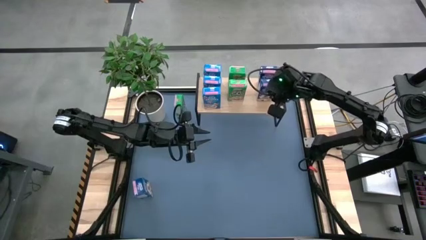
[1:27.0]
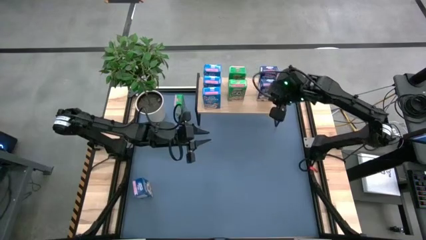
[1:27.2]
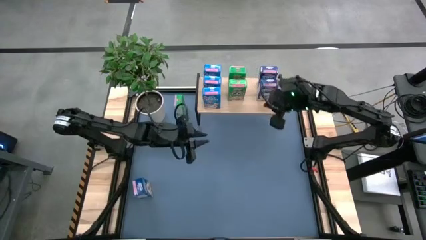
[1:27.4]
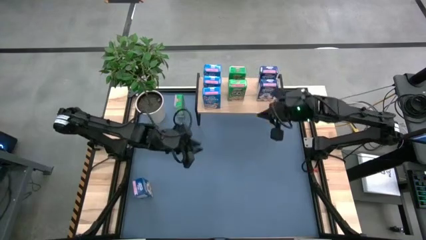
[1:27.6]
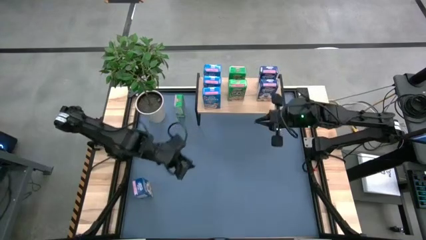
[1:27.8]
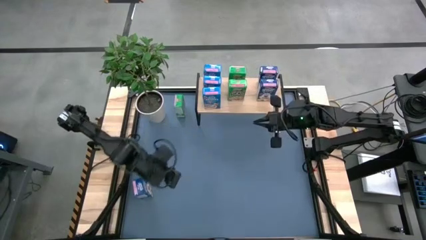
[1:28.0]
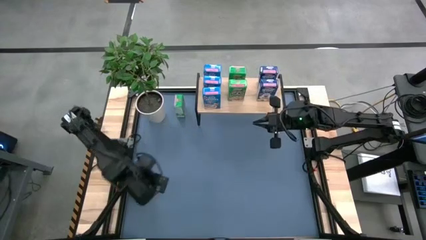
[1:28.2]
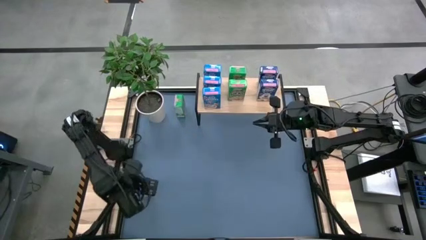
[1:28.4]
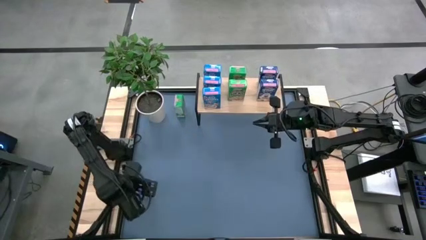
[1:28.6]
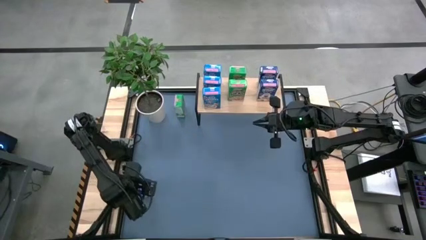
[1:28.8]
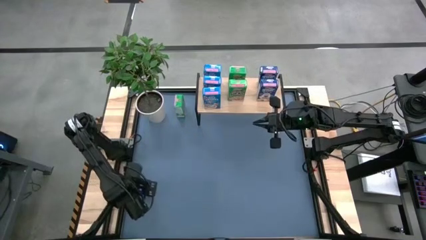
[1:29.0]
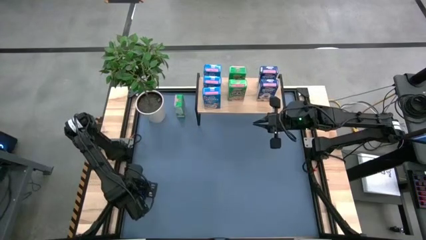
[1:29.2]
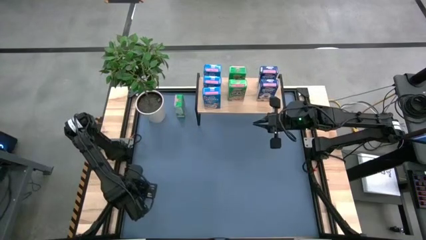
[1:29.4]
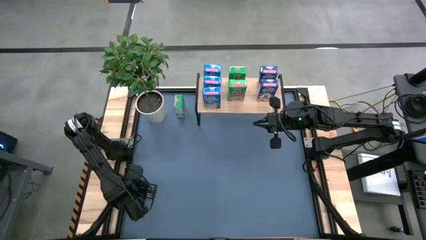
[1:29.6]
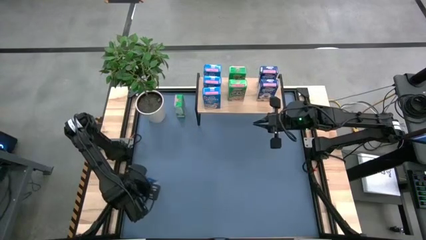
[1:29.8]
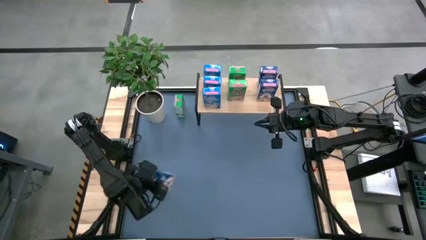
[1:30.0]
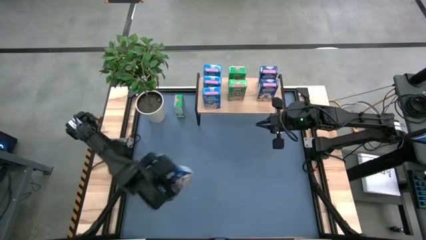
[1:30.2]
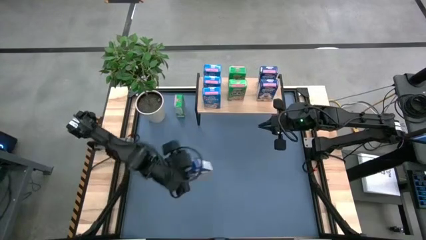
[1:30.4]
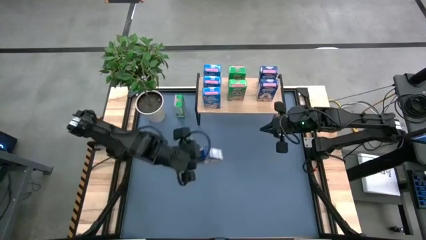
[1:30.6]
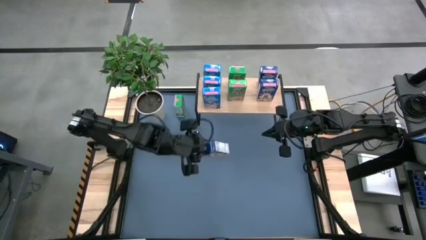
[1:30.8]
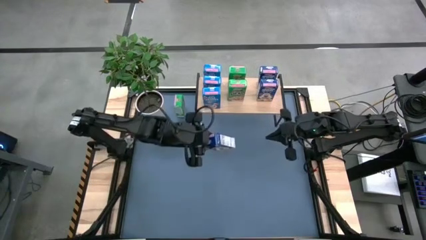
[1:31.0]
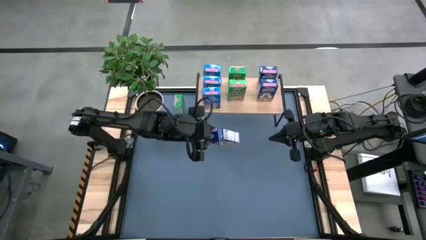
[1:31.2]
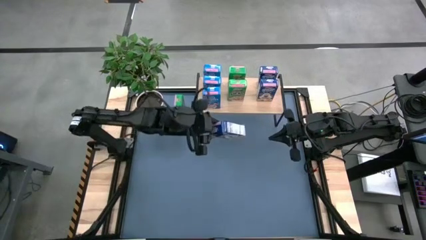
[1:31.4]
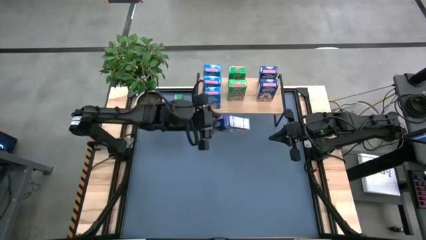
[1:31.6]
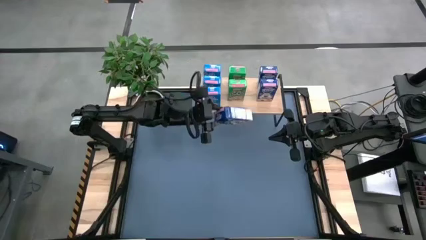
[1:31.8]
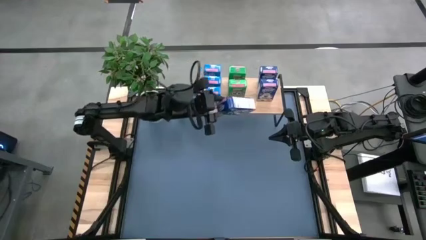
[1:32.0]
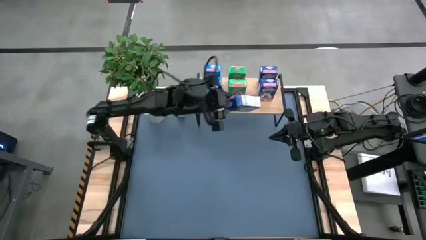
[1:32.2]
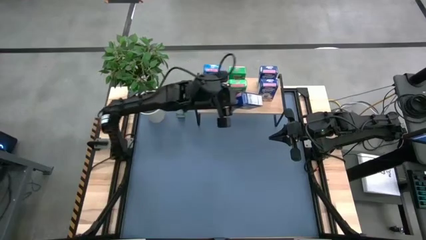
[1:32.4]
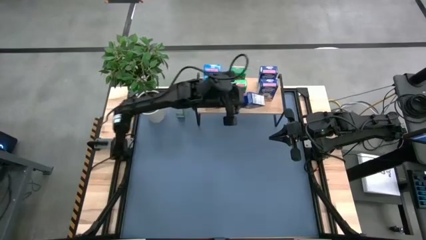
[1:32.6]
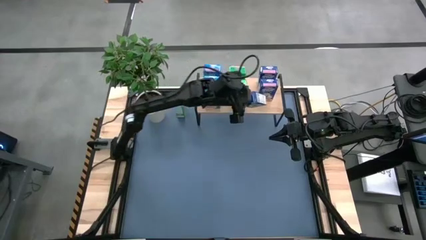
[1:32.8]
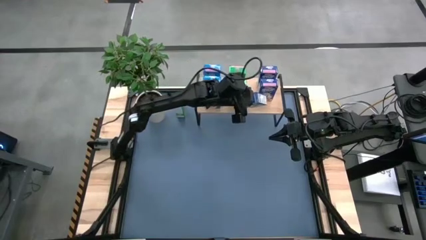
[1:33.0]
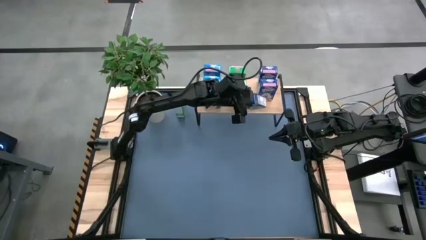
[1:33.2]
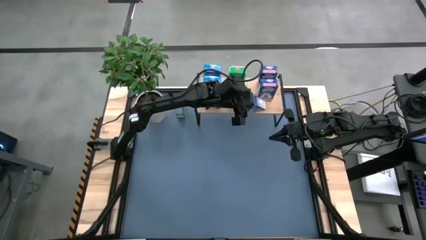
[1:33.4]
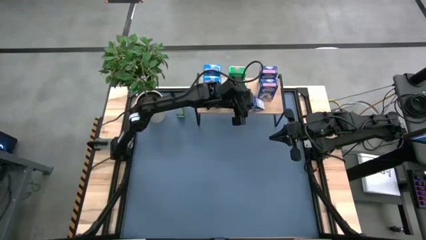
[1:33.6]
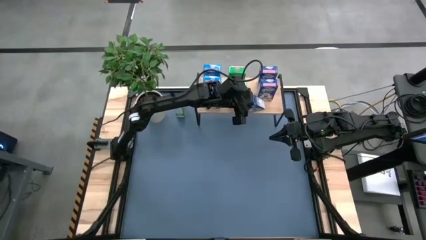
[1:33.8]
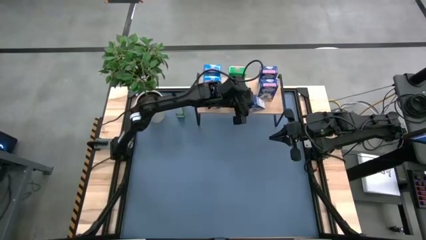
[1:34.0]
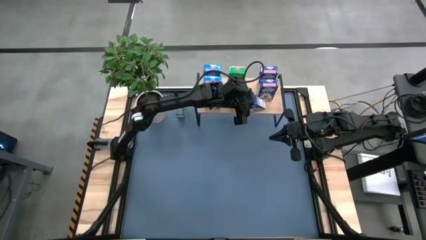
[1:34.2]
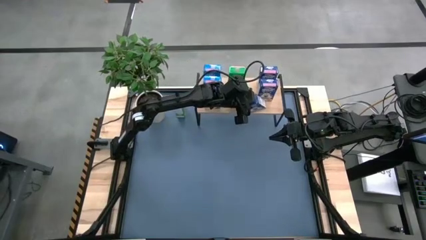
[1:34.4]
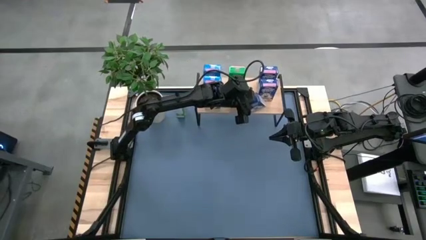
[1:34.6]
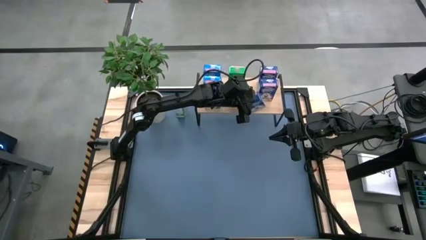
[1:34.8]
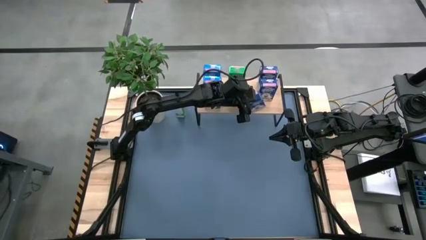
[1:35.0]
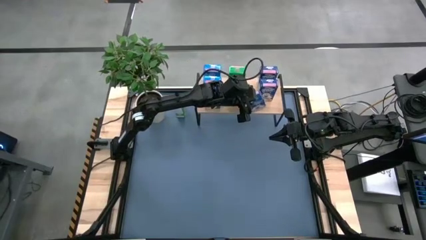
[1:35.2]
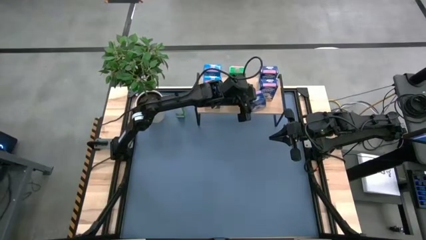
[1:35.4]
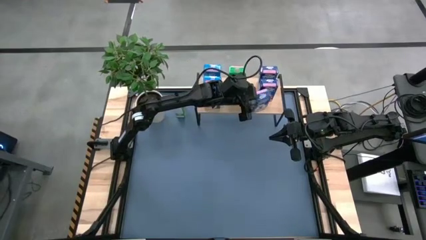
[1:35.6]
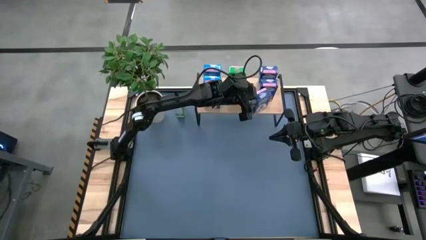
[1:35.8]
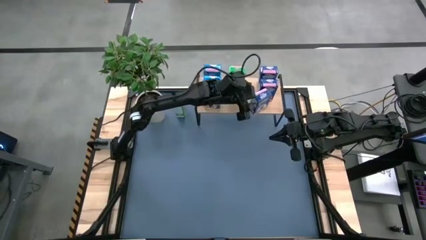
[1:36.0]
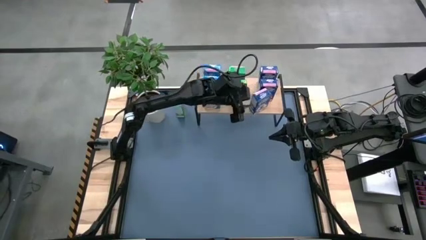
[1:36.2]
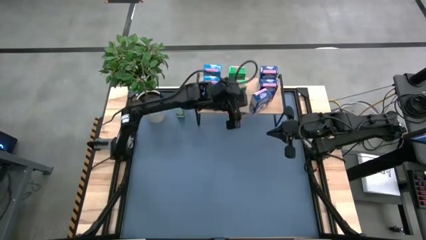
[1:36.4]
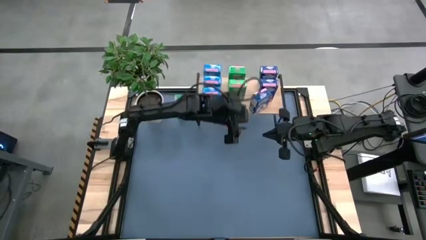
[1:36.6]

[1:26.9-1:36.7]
Task: Stack cereal on shelf
Put the blue cereal box on the shelf aligned with the other blue cereal boxes

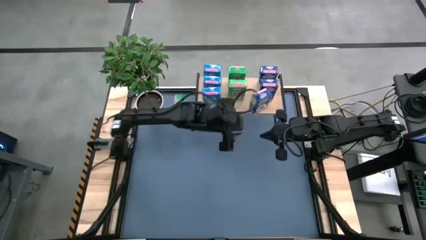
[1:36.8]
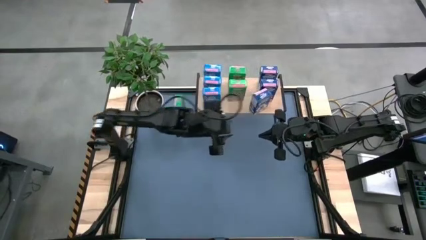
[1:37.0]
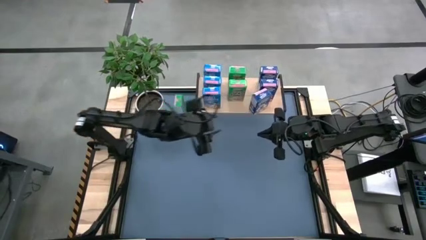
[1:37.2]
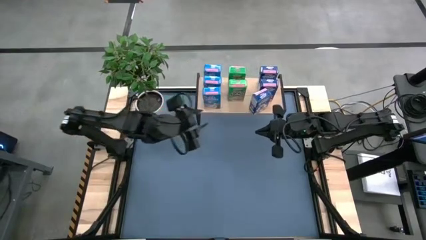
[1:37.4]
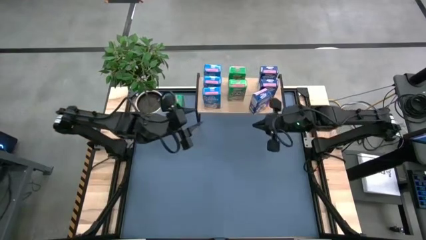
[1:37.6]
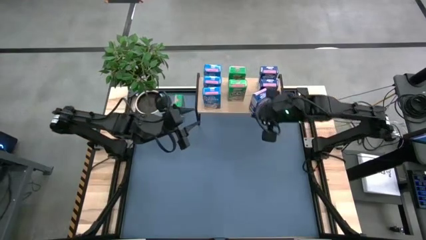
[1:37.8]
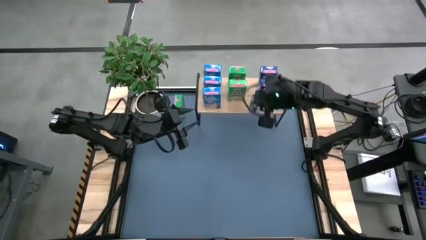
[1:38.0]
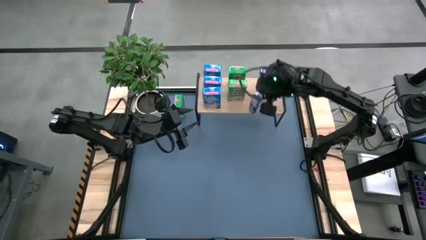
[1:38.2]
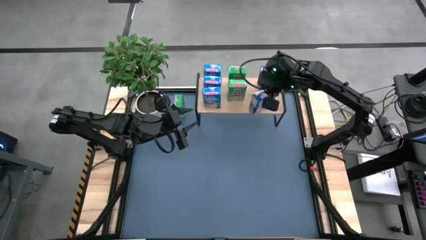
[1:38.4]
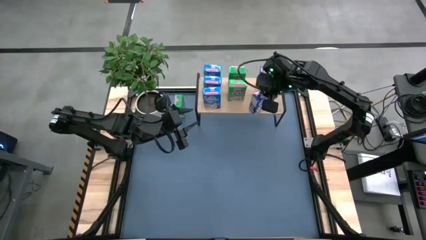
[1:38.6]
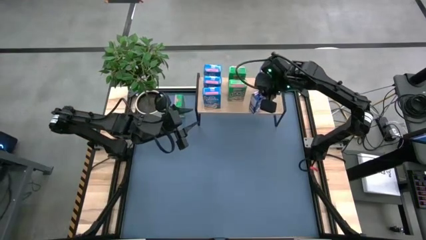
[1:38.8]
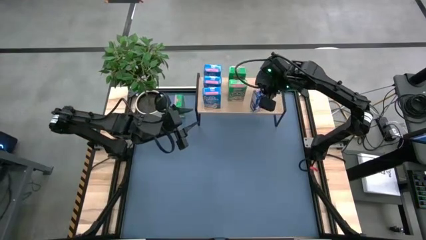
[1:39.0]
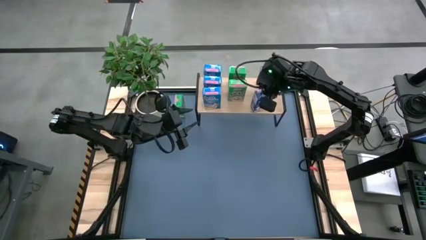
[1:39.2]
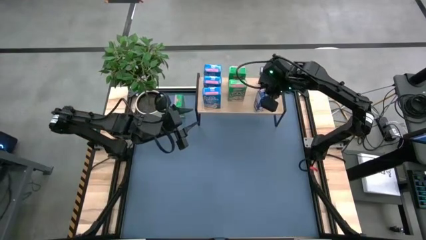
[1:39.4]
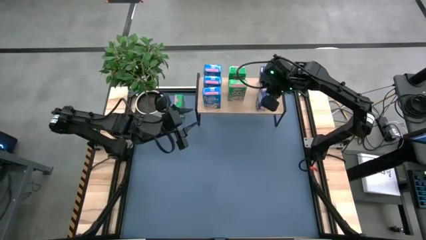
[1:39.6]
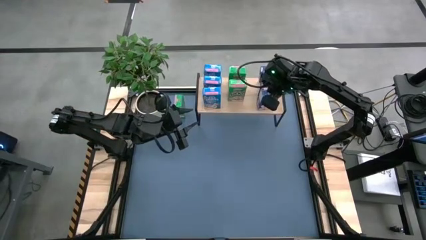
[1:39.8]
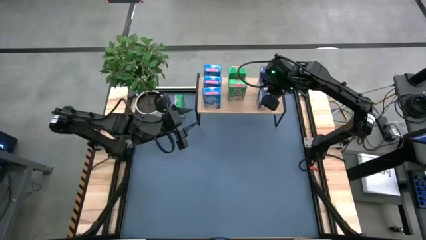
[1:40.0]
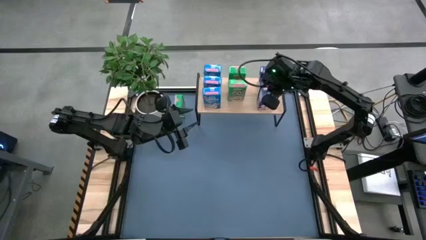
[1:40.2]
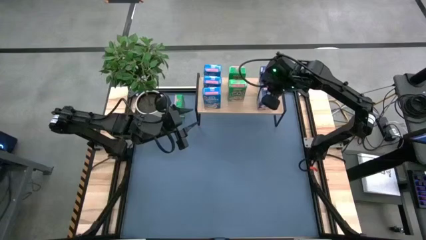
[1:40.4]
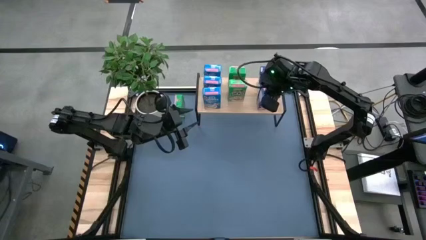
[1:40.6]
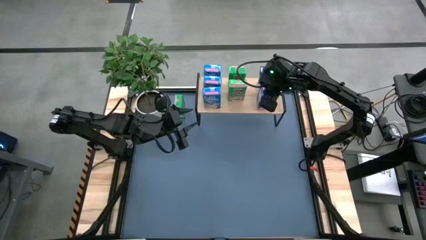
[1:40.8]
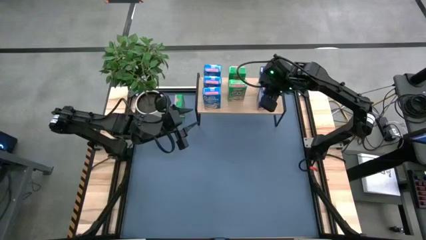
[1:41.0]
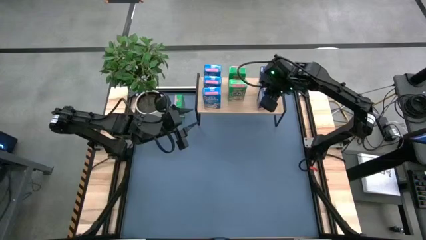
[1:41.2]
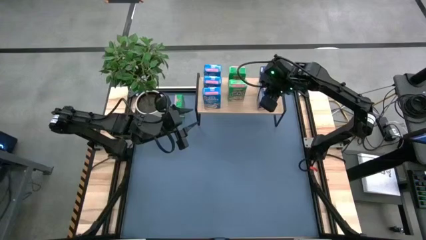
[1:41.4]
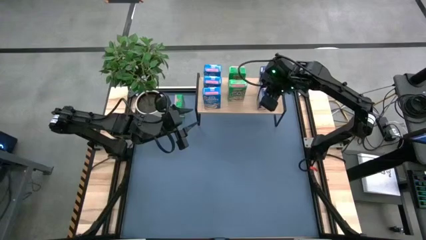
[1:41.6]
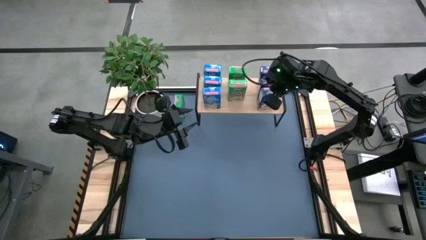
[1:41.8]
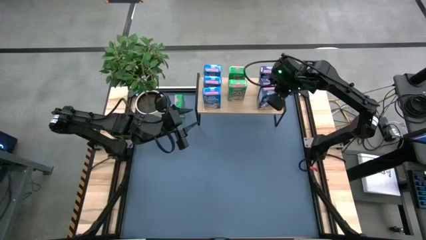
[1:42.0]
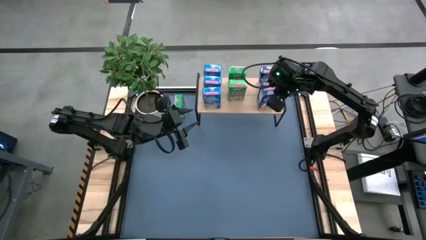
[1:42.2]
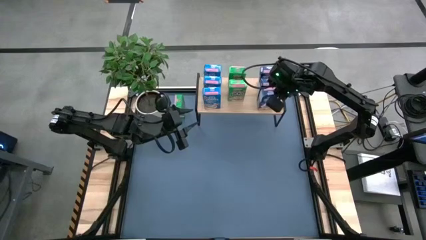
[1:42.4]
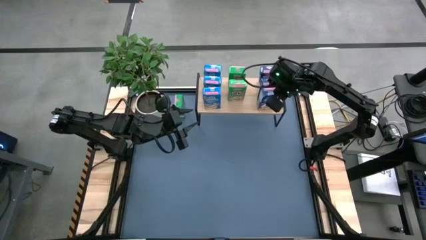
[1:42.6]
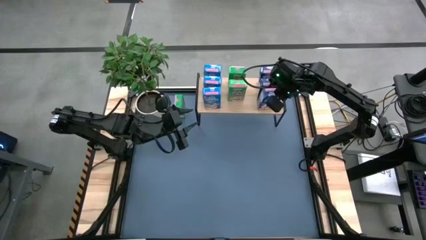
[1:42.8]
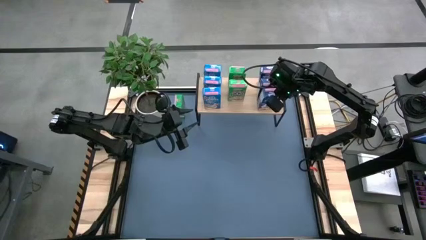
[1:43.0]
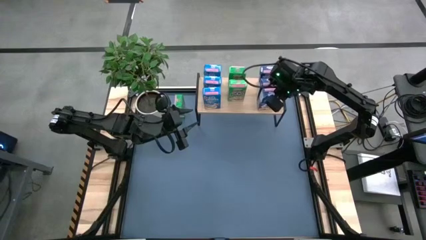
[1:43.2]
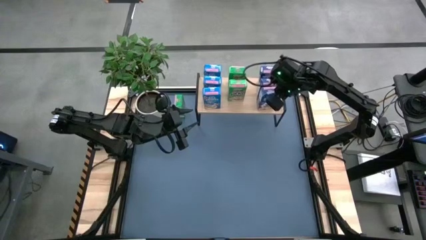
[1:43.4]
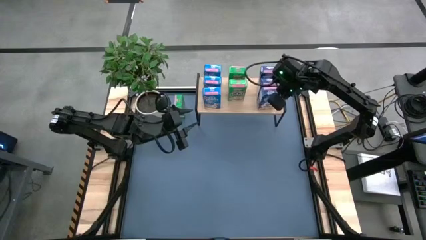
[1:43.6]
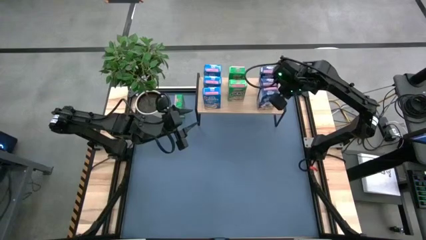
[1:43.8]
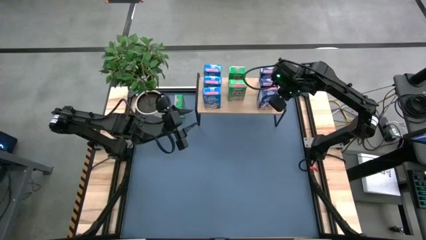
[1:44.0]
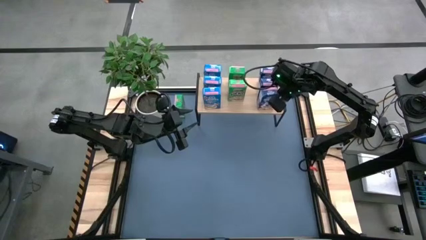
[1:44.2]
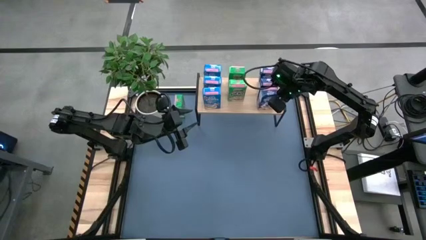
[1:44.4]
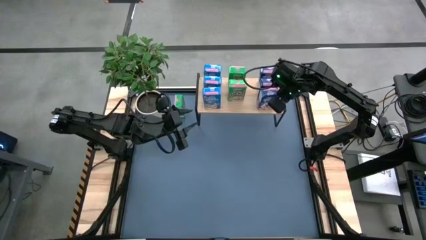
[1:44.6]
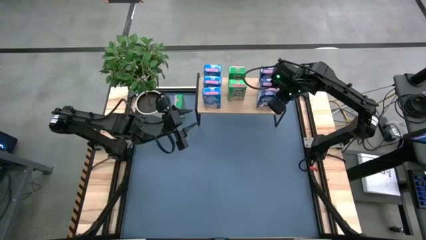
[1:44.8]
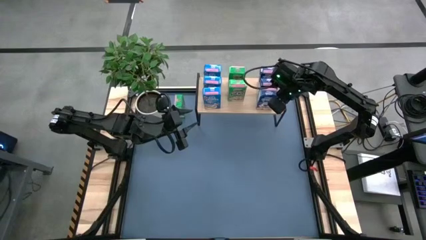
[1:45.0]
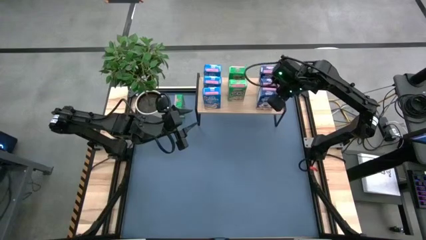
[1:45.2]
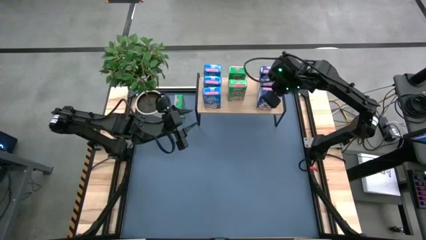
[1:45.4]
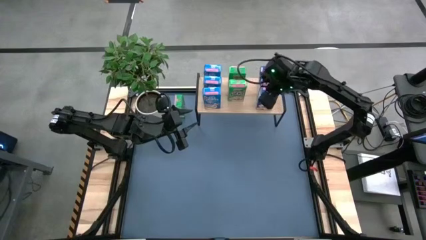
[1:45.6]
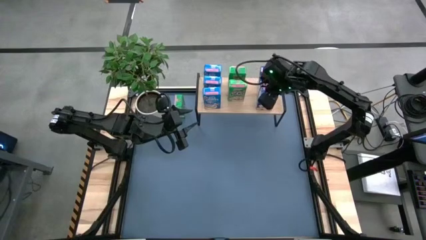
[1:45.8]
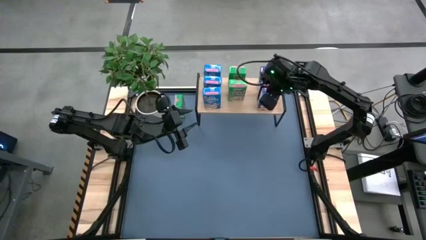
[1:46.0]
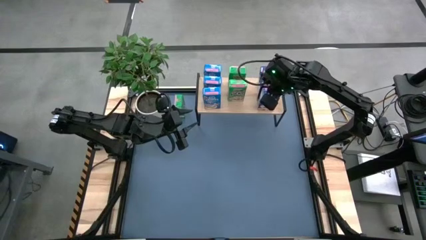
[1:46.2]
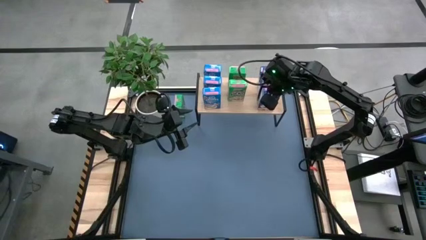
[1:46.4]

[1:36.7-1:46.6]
Put the blue cereal box on the shelf aligned with the other blue cereal boxes
